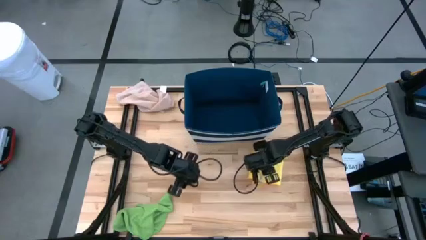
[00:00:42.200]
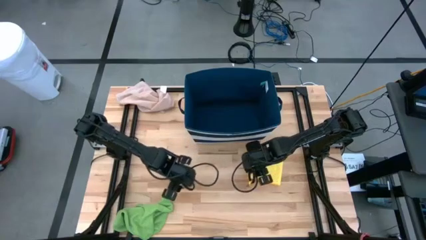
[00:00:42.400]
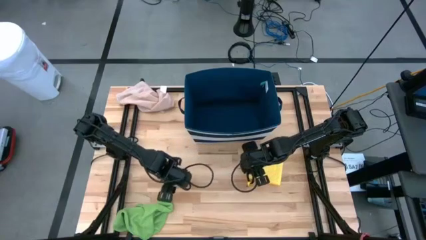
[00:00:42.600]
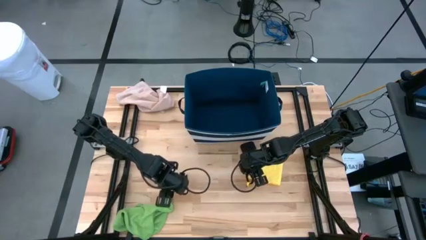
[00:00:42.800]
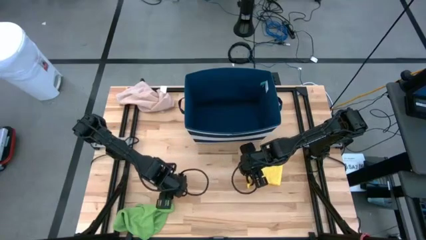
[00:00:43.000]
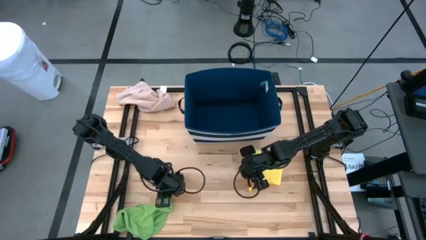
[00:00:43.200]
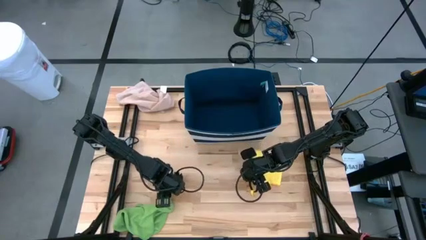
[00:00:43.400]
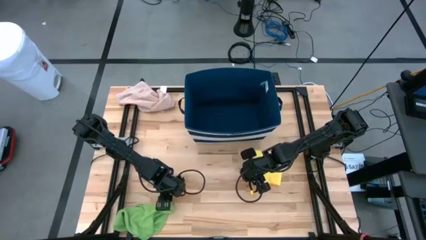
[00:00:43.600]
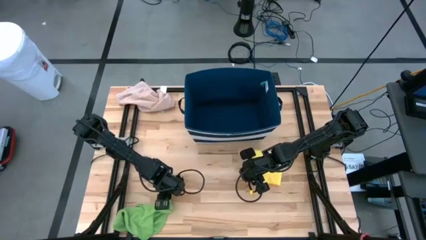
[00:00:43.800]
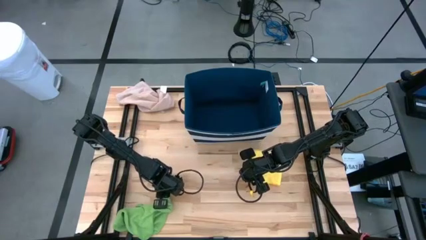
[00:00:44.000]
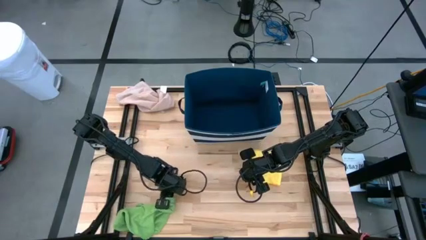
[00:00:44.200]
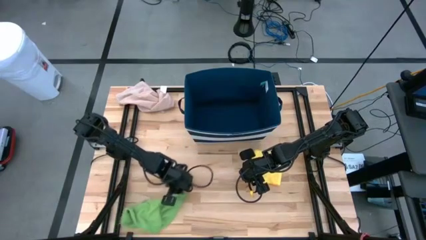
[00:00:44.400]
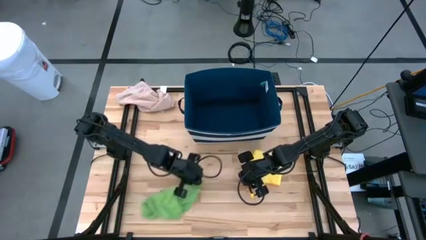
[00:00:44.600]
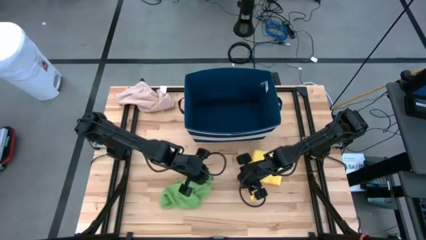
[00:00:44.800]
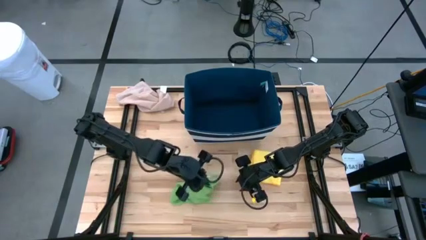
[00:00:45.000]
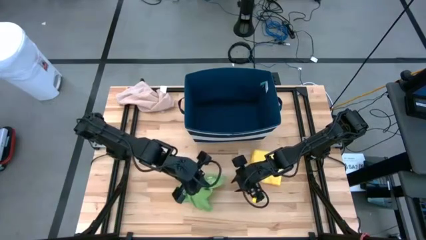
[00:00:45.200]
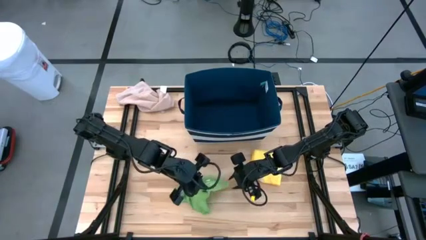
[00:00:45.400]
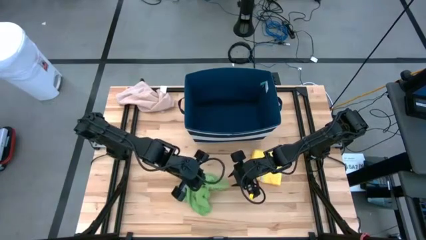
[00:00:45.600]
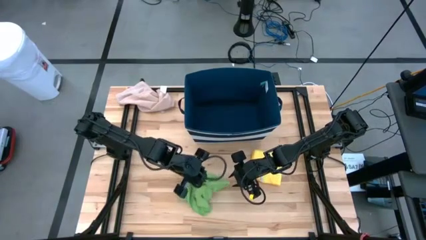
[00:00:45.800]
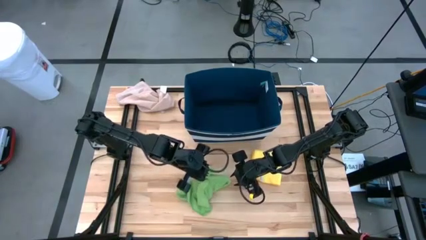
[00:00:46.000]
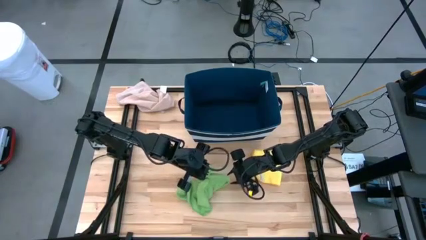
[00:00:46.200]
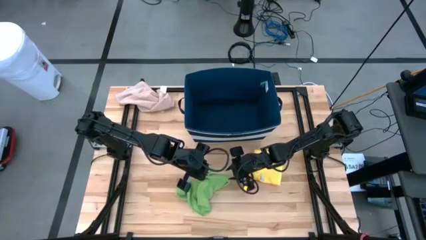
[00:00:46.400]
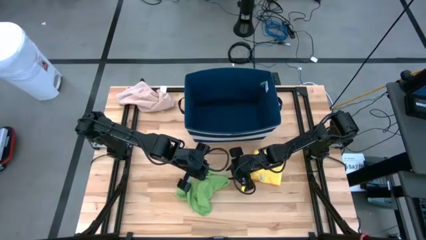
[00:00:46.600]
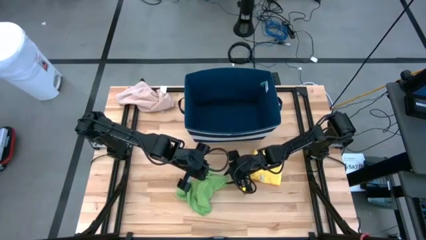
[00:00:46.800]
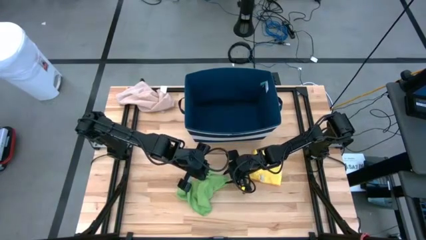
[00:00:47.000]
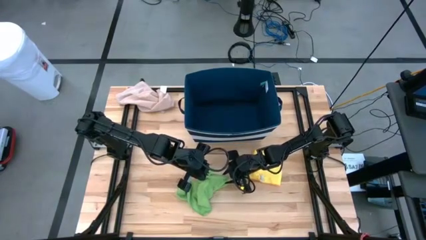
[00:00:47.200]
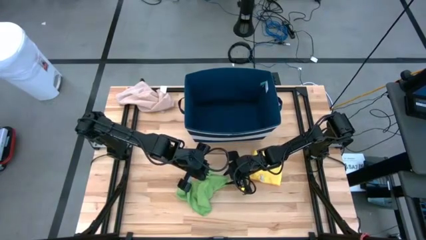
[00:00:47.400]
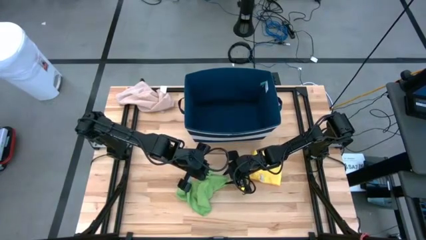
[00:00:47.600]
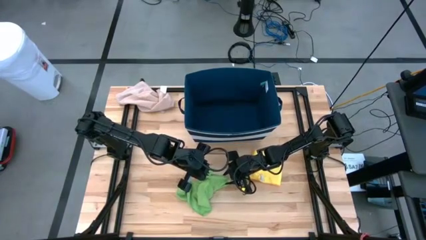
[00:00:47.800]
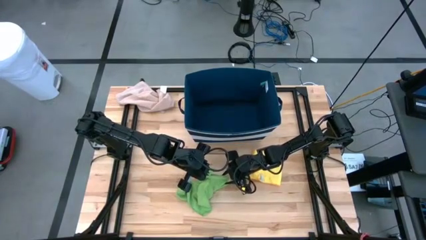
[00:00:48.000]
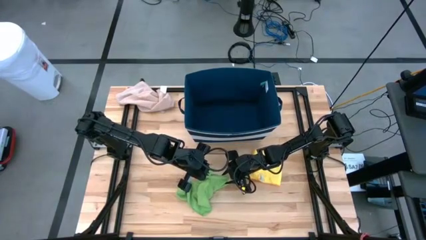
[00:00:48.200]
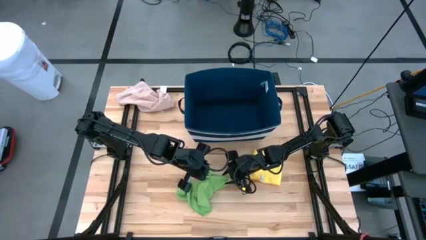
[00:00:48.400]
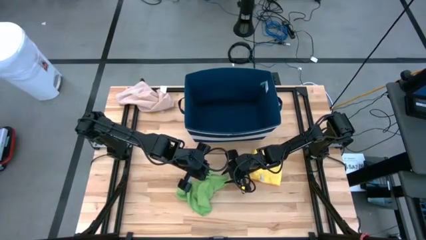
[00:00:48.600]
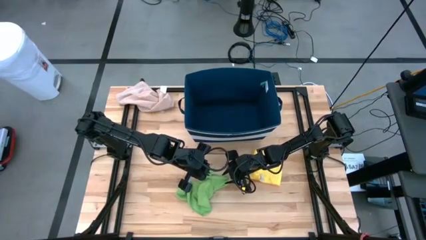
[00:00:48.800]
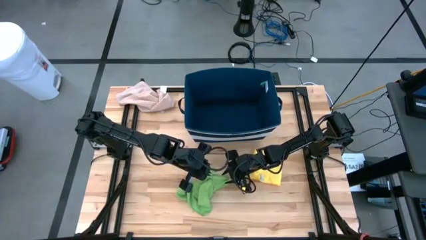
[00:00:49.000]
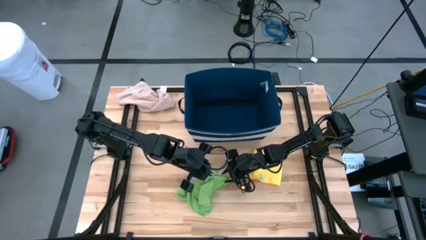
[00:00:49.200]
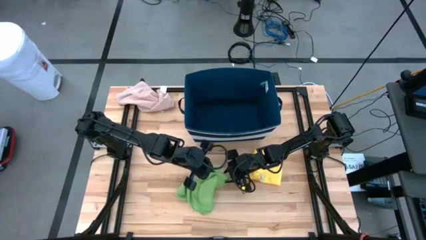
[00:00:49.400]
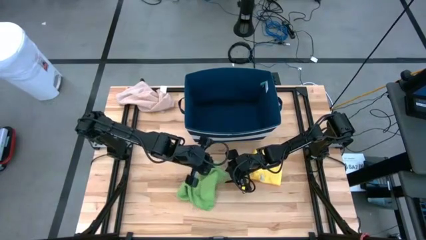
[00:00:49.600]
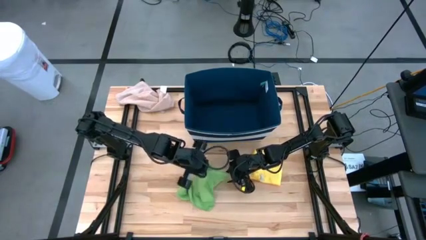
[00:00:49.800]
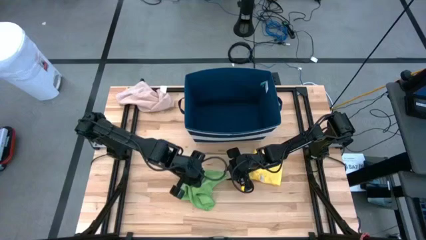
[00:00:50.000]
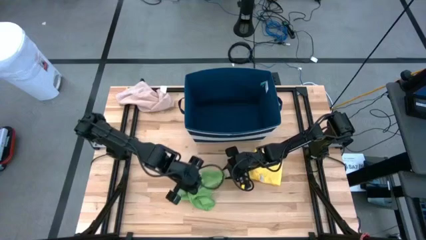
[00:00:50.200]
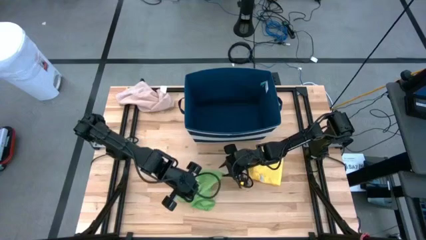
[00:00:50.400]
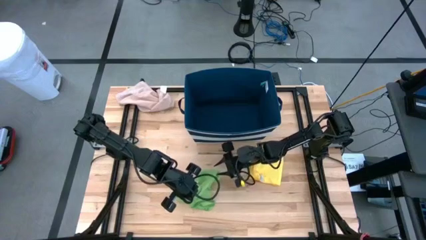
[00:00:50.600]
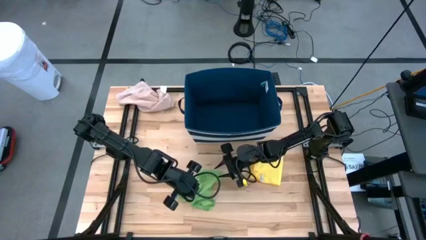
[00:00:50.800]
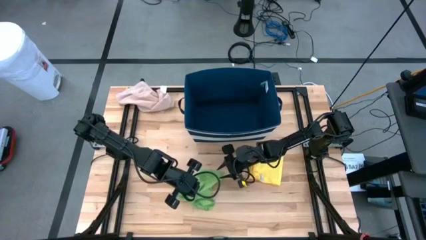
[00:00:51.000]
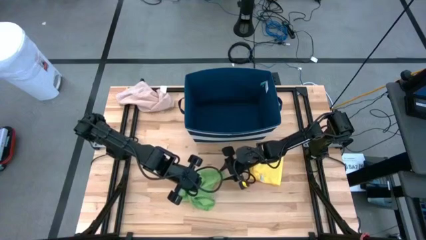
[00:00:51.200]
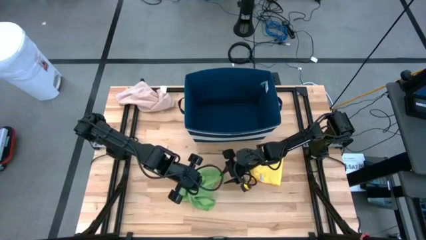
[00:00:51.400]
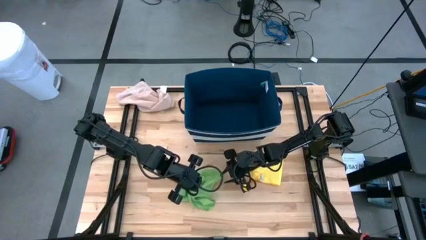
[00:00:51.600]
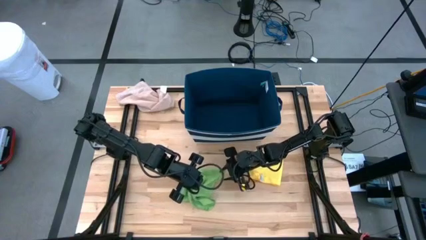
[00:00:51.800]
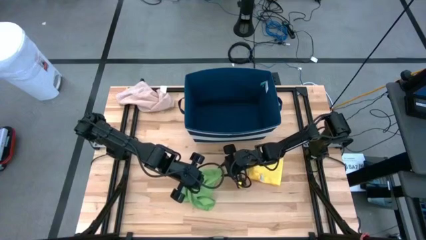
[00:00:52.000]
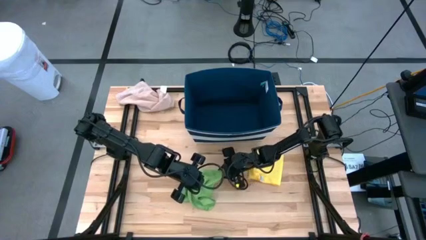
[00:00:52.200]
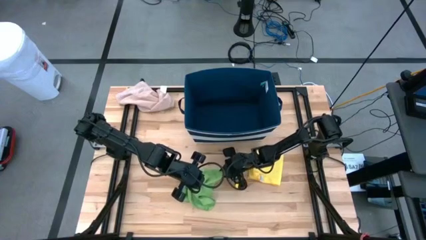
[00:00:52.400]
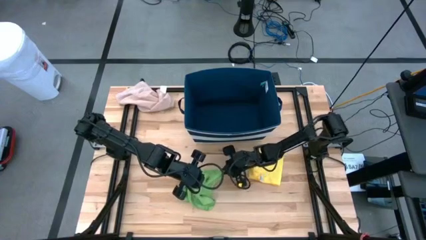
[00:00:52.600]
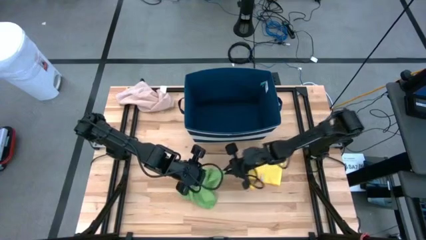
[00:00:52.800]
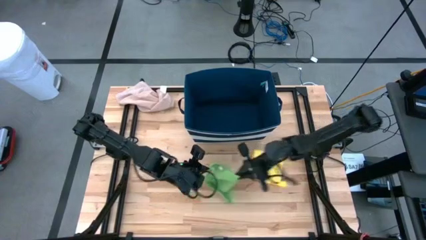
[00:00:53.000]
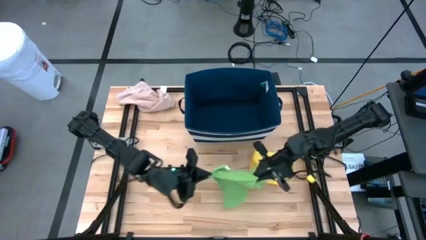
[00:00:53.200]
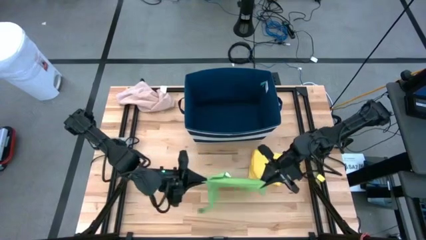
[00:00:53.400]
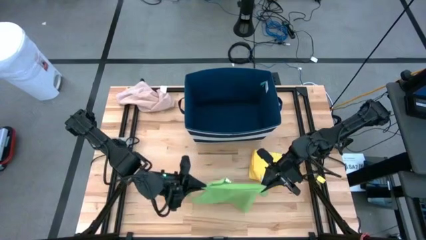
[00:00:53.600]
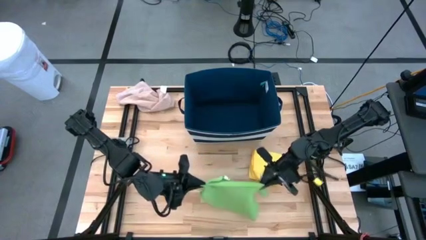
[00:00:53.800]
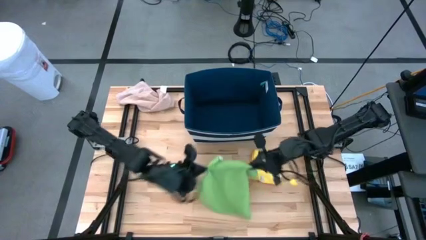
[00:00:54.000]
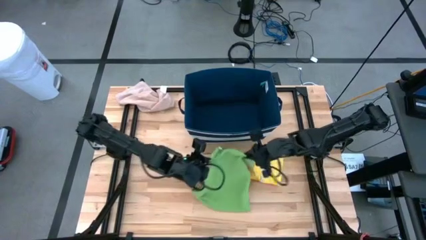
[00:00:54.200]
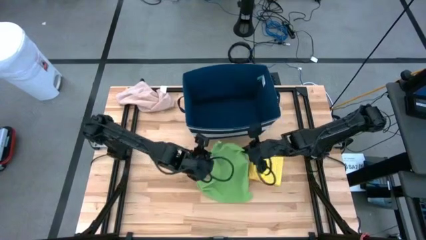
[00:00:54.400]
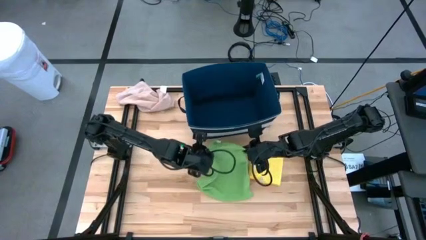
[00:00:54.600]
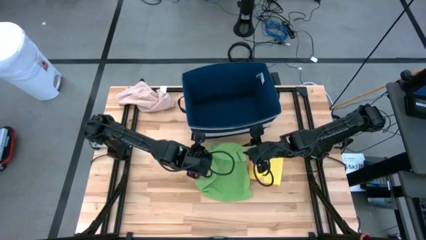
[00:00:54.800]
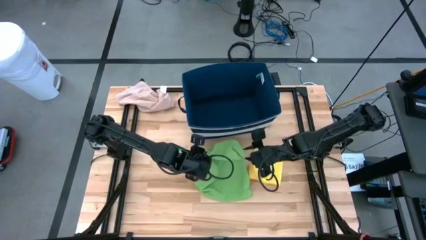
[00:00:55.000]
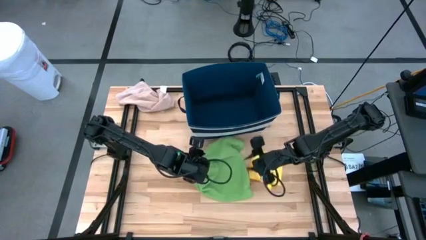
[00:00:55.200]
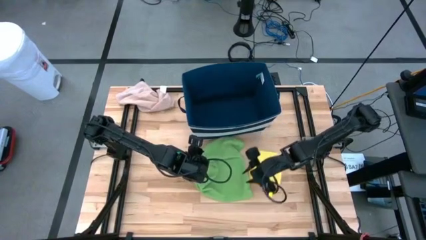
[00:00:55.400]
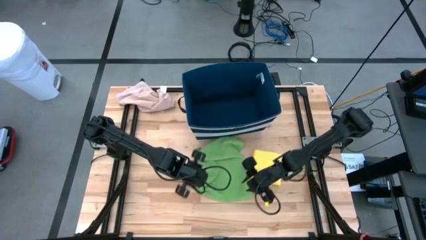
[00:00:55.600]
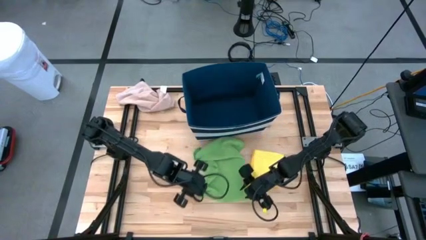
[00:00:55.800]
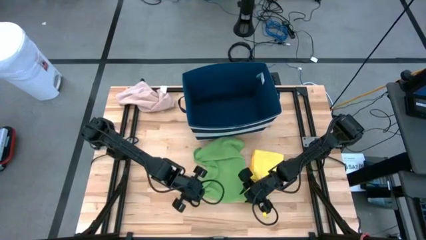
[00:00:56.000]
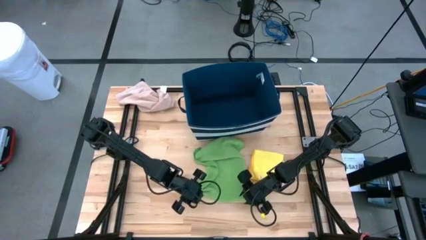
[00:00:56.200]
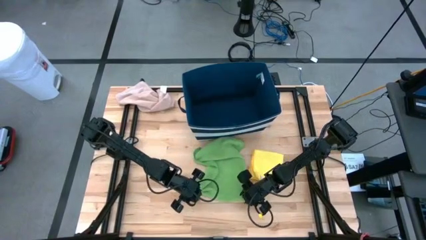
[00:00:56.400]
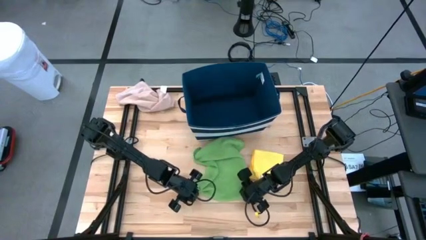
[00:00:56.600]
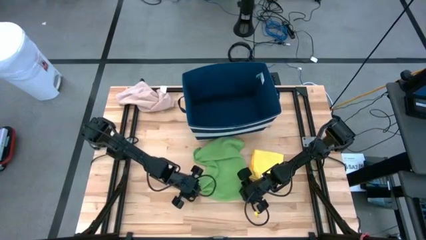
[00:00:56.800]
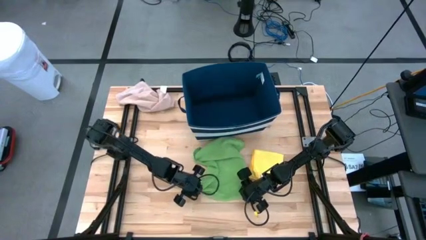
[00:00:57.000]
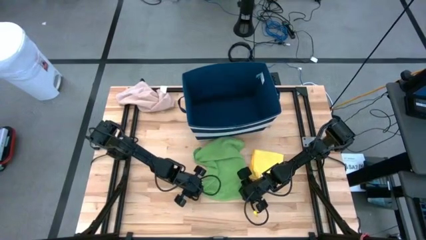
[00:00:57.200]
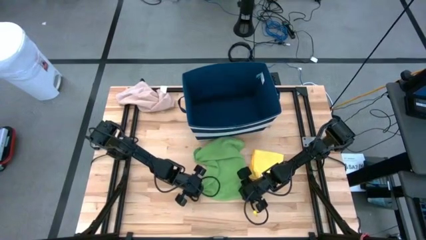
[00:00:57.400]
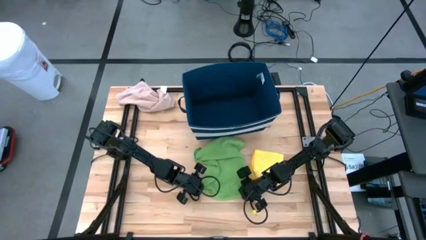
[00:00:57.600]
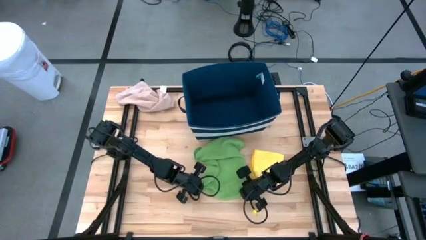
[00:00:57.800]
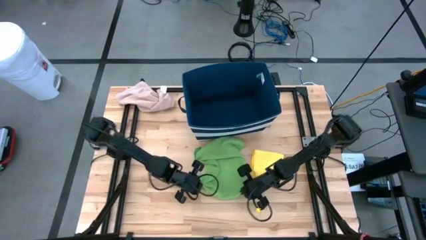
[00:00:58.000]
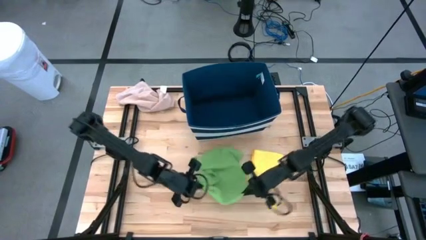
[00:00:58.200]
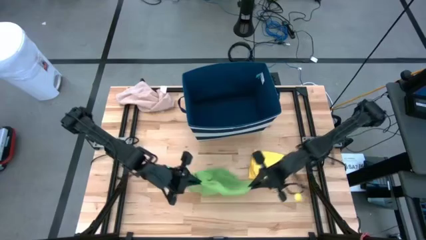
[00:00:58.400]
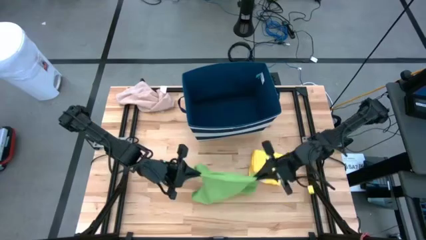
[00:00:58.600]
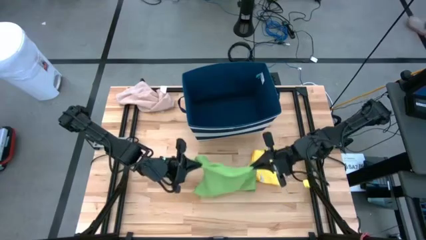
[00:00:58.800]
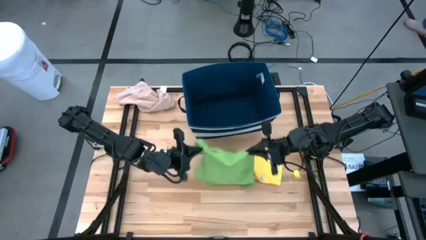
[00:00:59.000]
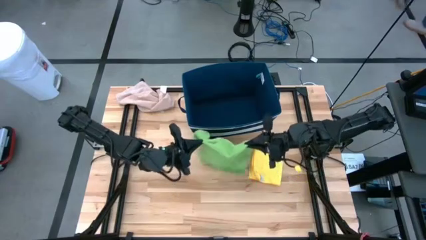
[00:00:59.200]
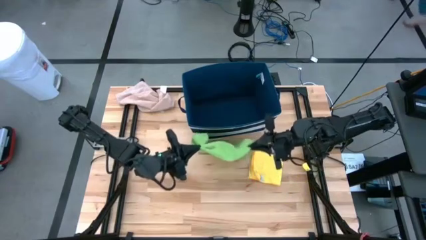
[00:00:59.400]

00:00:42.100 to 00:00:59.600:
Task: Fold towel
Fold the green towel
